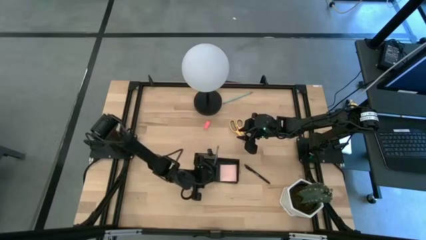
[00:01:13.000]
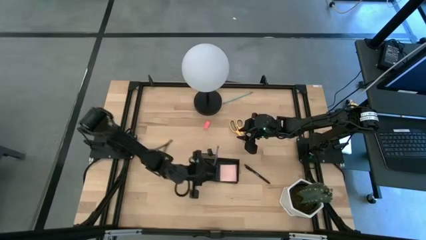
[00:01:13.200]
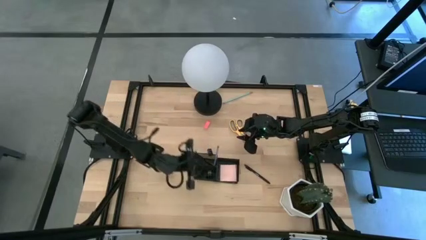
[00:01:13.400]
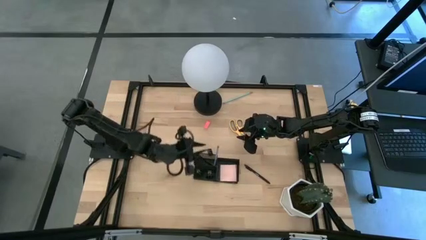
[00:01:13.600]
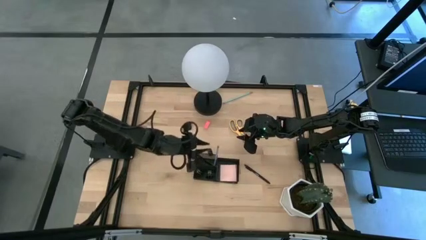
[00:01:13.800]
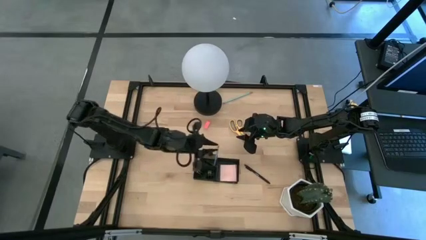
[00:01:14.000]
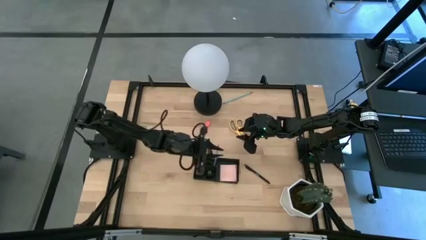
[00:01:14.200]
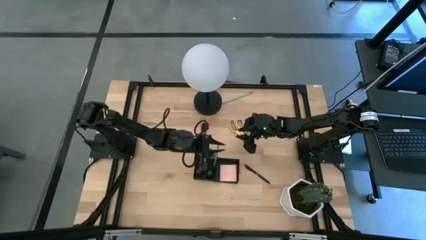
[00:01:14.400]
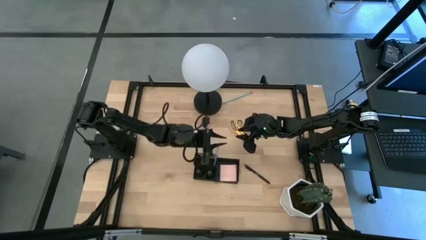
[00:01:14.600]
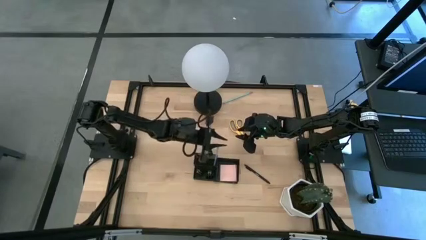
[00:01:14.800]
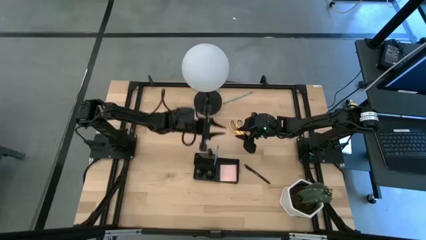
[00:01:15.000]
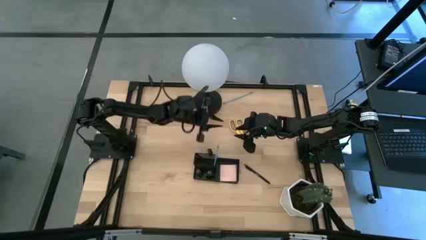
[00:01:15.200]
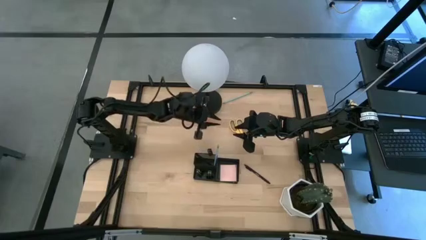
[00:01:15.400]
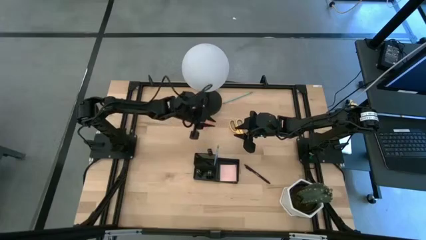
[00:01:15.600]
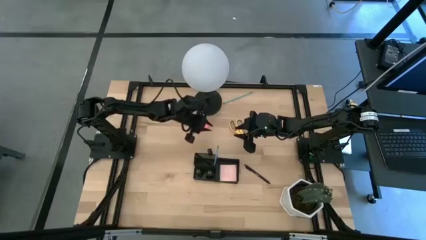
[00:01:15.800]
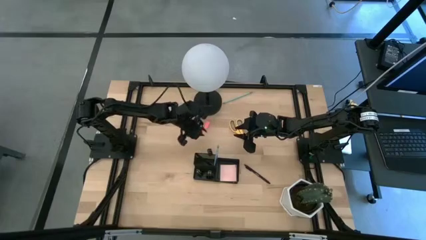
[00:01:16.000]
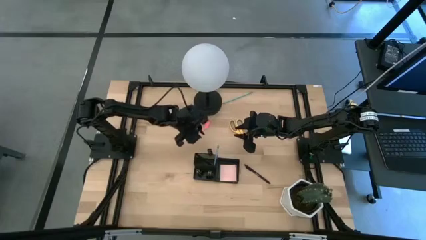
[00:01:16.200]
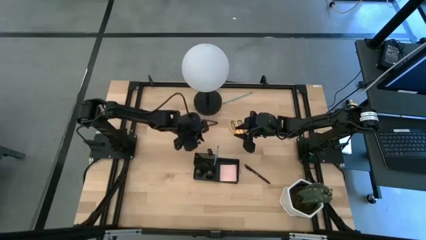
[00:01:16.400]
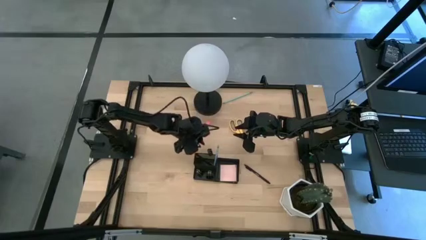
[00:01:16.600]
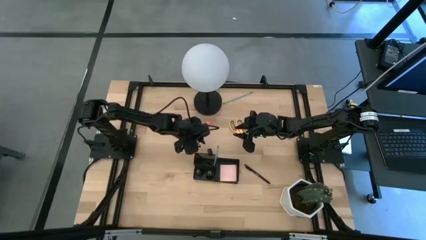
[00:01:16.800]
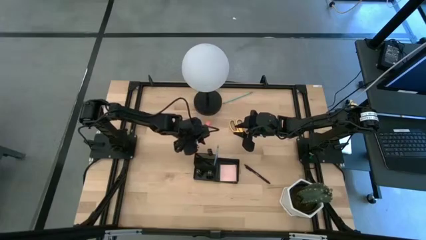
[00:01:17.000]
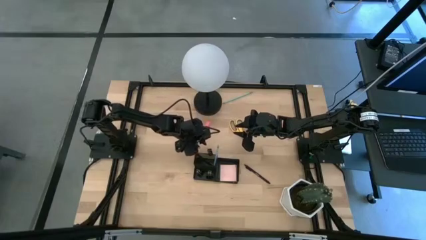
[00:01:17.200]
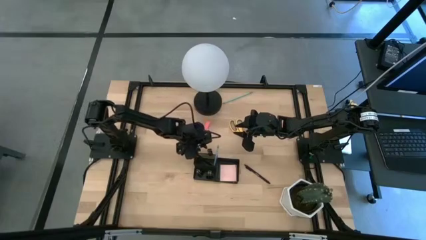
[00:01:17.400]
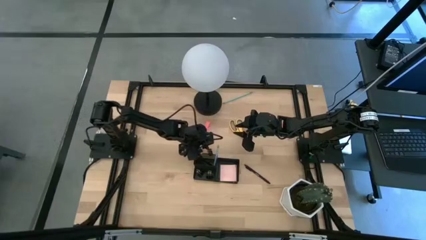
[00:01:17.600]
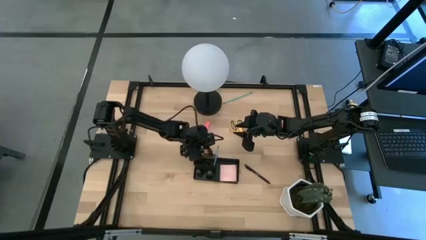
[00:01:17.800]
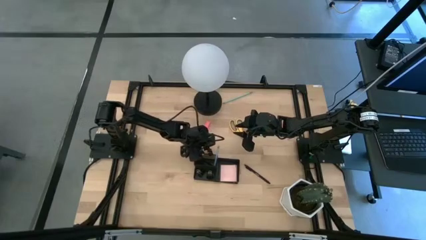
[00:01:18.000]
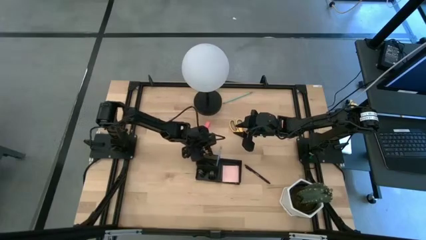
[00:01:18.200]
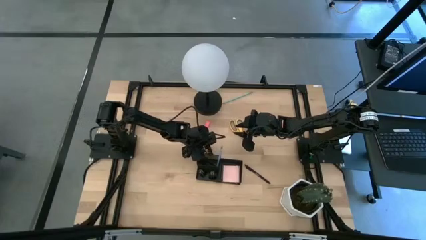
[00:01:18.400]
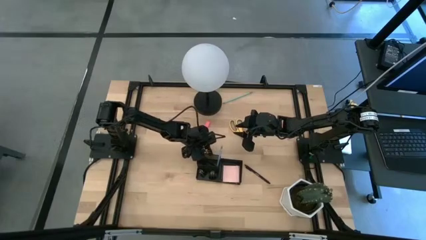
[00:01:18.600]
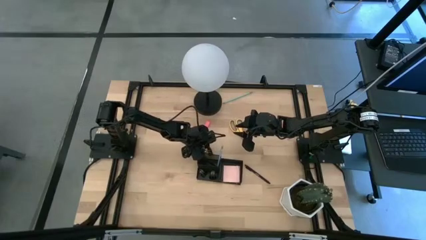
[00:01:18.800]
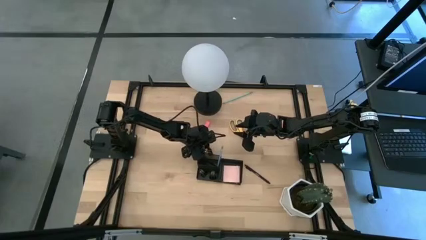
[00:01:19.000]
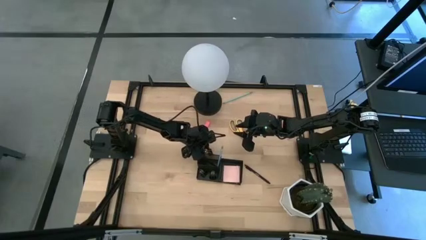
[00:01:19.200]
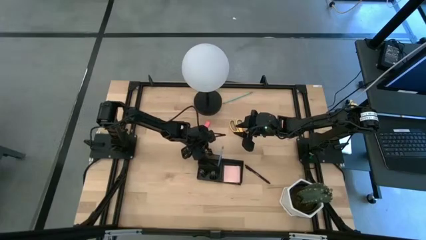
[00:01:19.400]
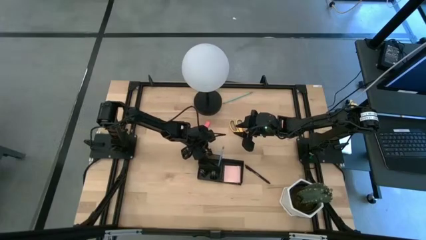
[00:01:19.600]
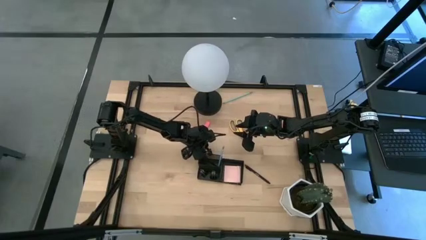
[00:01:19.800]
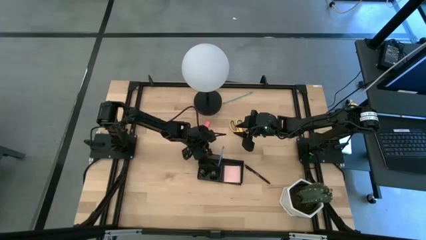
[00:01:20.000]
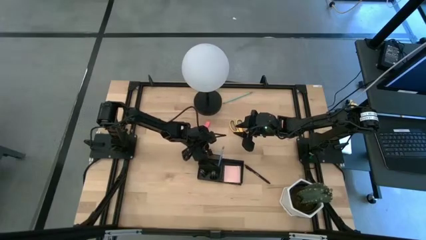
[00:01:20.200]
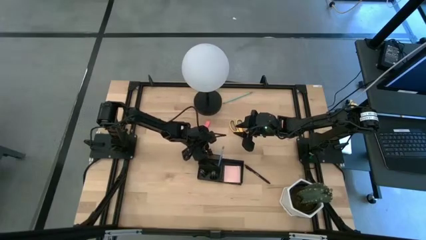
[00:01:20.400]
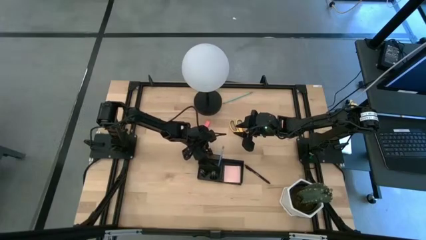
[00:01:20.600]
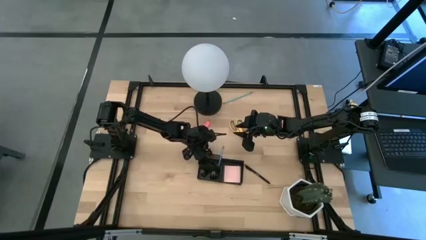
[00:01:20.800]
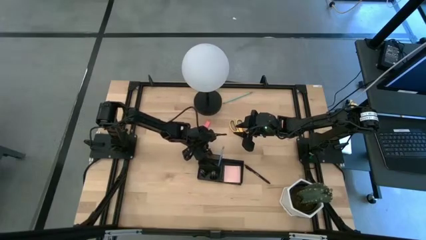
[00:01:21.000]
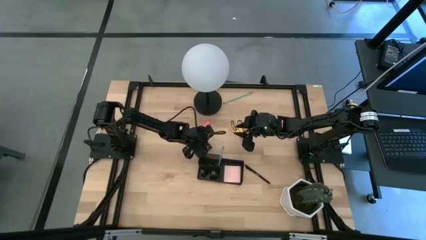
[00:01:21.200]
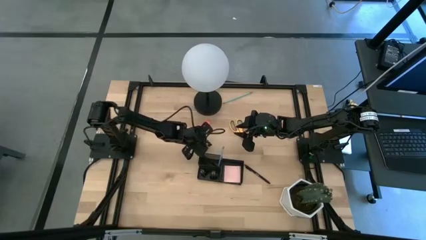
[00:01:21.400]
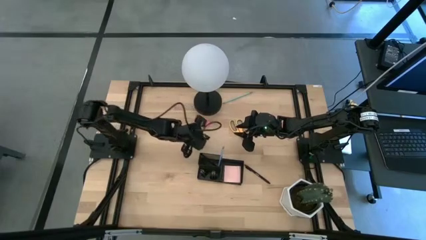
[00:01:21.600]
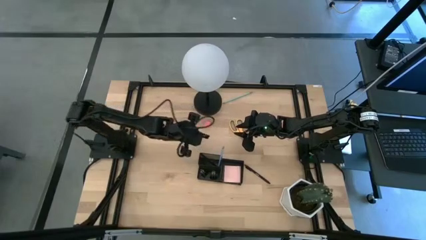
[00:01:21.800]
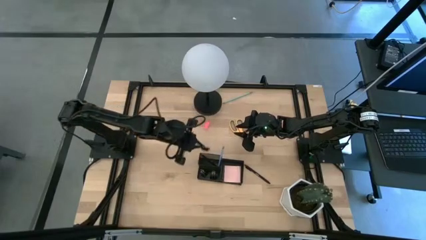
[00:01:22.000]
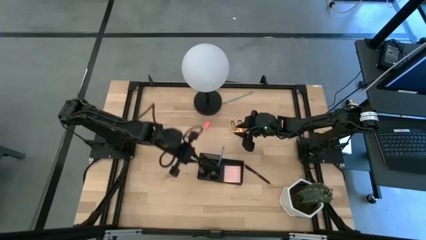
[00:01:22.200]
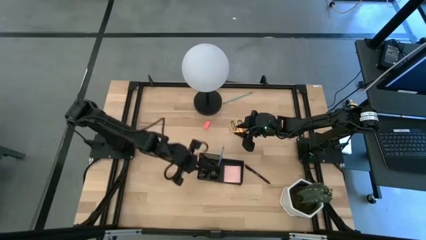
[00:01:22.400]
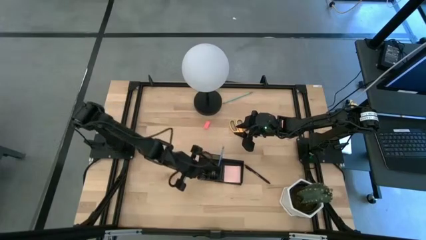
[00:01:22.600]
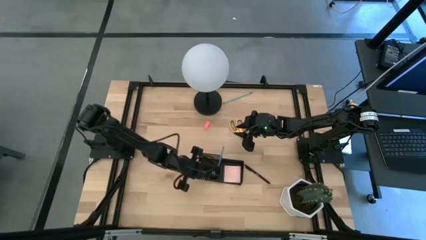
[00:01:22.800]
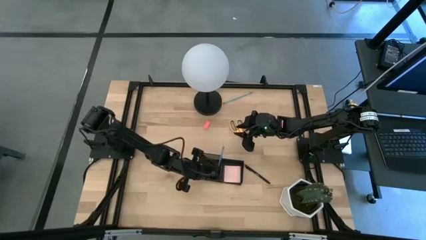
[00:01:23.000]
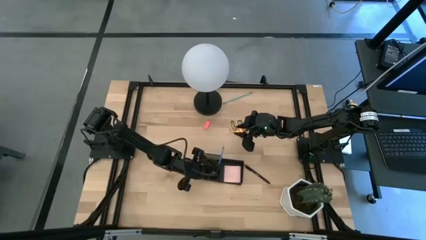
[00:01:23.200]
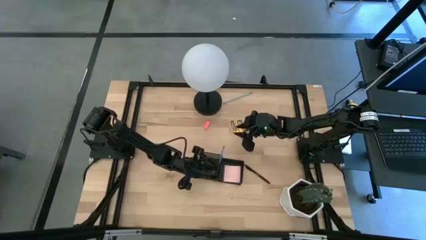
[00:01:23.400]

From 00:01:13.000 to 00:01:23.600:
Task: Pick and place office supplies into organizer
Put the black binder clip into the black desk organizer

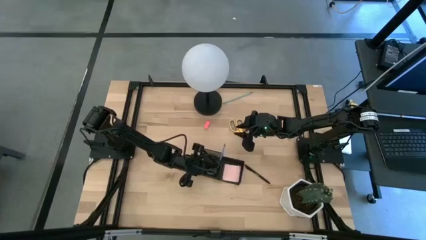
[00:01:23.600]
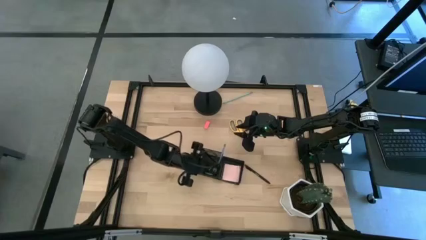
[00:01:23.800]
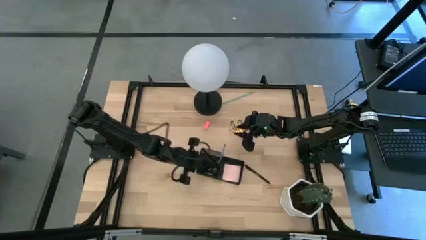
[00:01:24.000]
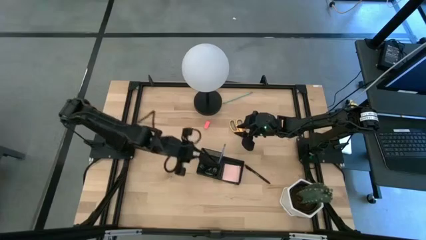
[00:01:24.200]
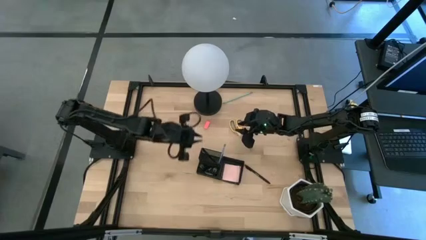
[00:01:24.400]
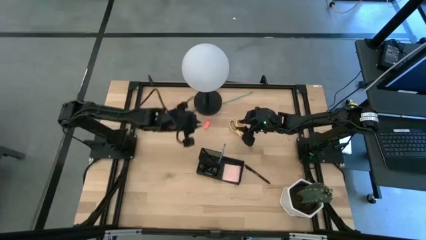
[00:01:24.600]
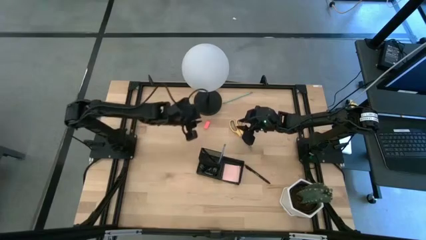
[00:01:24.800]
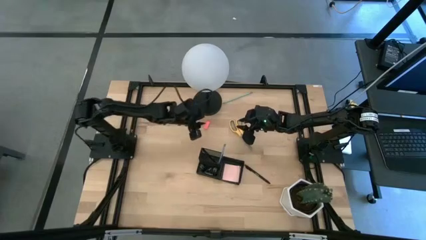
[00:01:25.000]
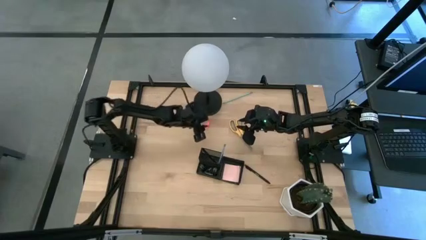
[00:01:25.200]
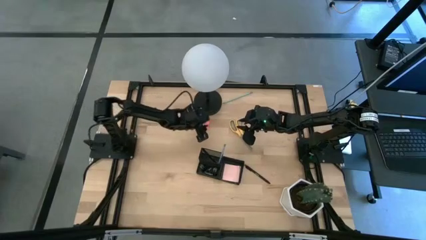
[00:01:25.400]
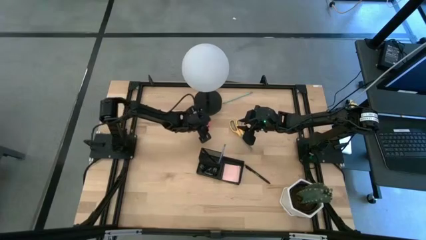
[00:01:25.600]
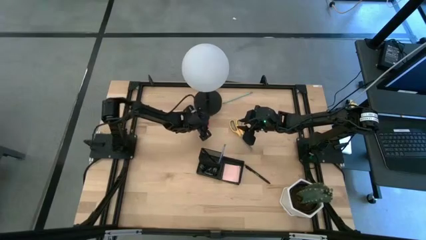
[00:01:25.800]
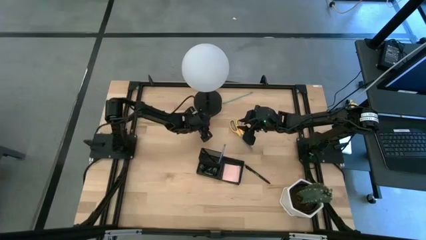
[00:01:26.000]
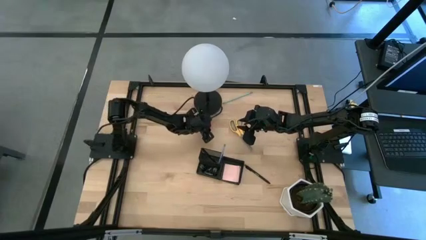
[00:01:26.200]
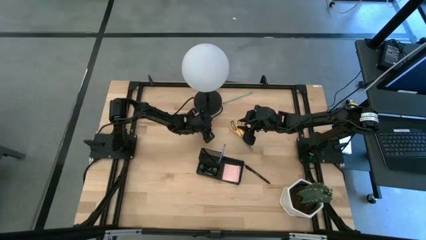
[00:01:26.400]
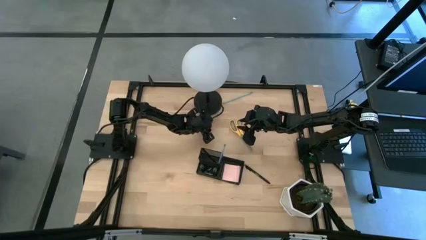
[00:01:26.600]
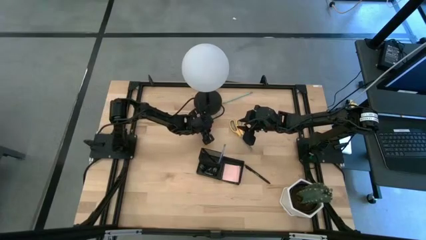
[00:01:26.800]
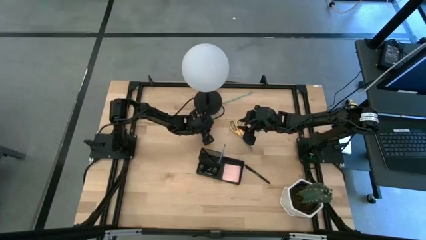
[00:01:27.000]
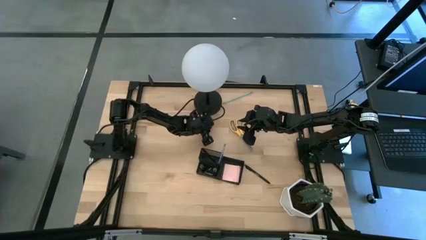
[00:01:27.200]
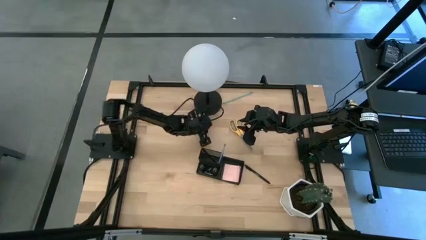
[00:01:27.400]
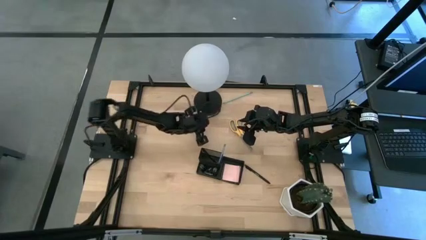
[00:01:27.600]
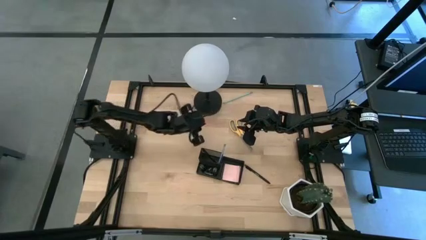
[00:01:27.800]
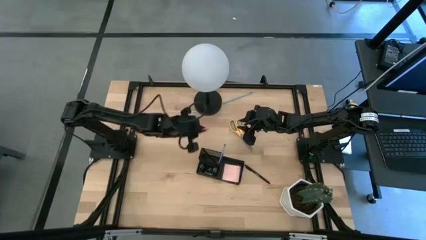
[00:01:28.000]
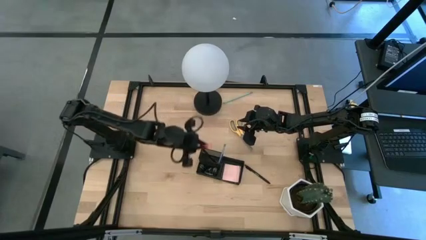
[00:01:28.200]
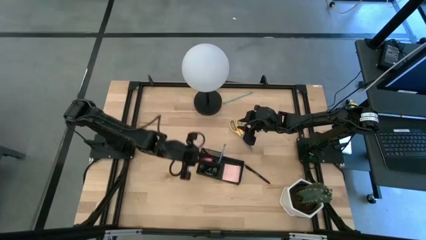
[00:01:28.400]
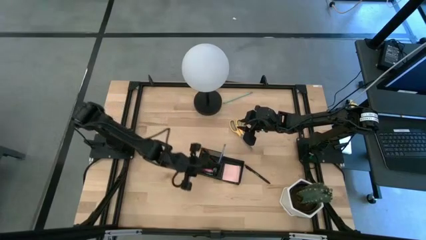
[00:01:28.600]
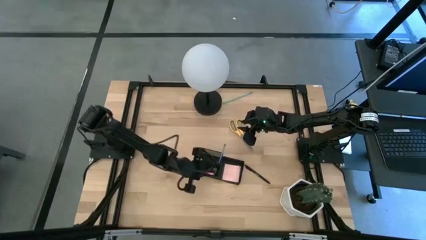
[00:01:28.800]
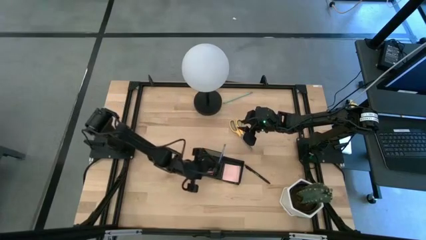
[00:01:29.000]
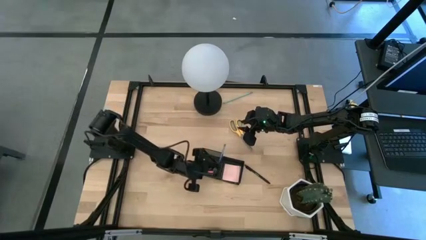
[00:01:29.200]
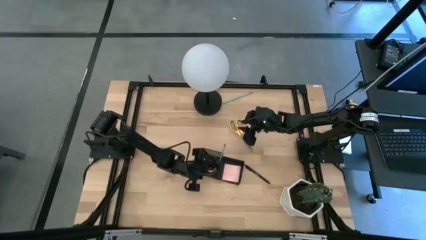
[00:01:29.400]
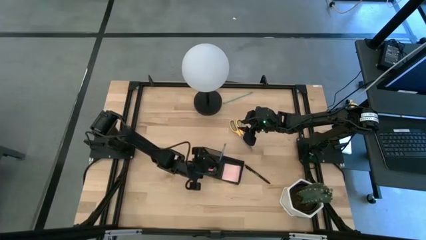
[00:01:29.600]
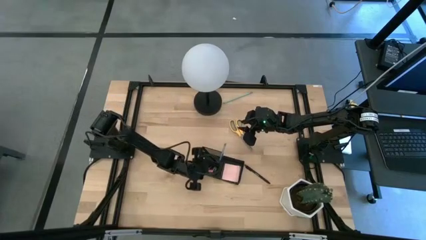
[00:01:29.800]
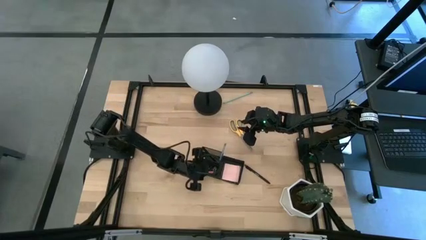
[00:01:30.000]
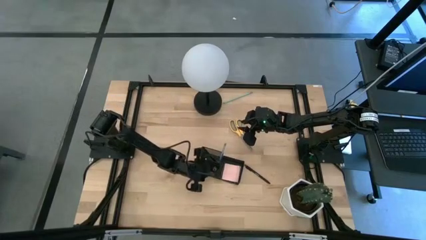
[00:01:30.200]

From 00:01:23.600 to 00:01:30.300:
Put the pink eraser into the black desk organizer
